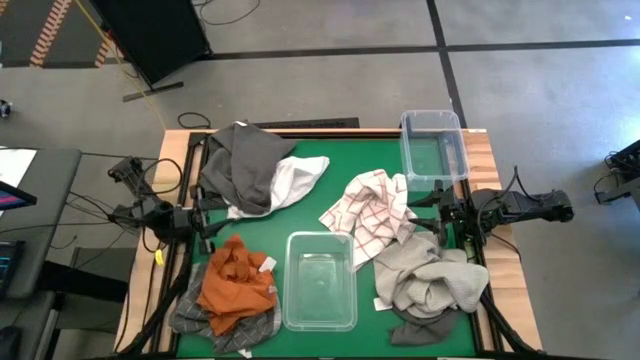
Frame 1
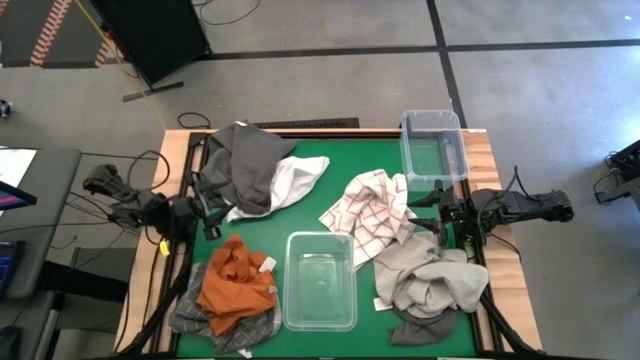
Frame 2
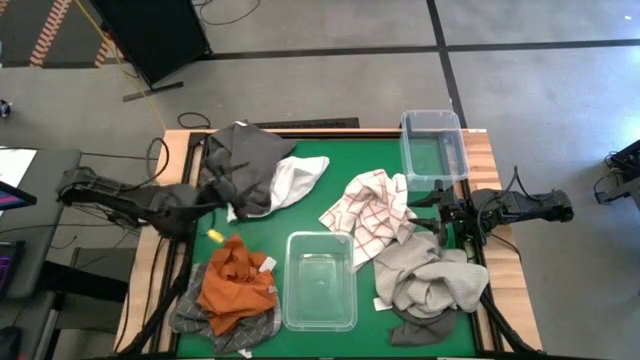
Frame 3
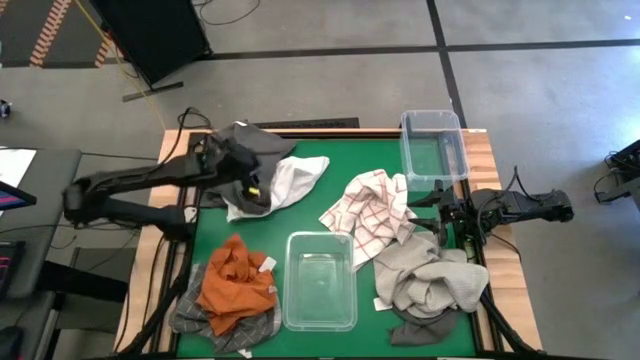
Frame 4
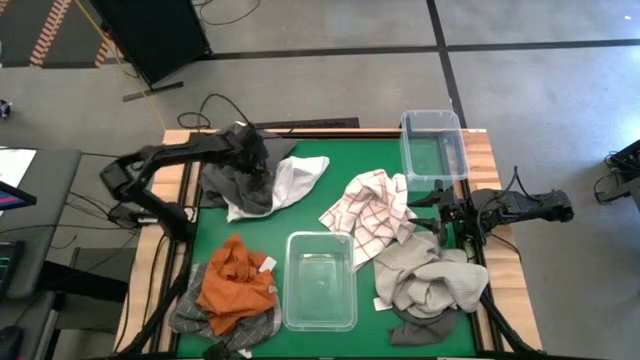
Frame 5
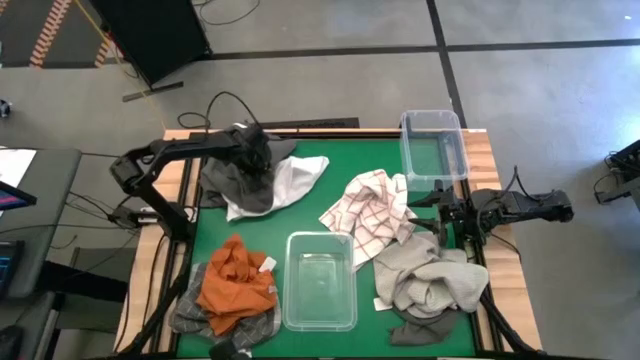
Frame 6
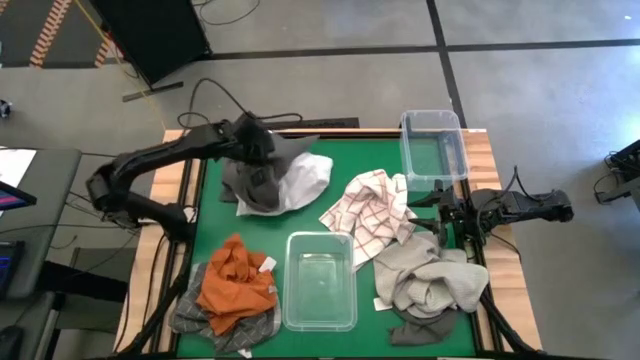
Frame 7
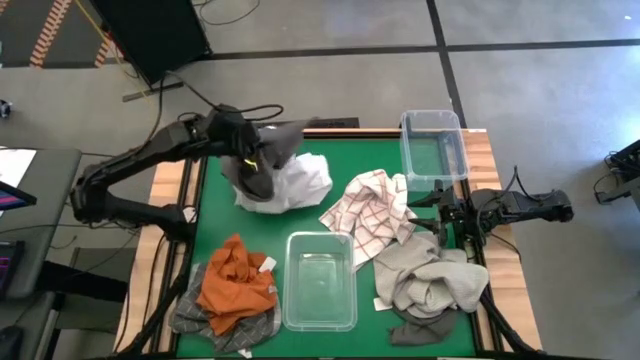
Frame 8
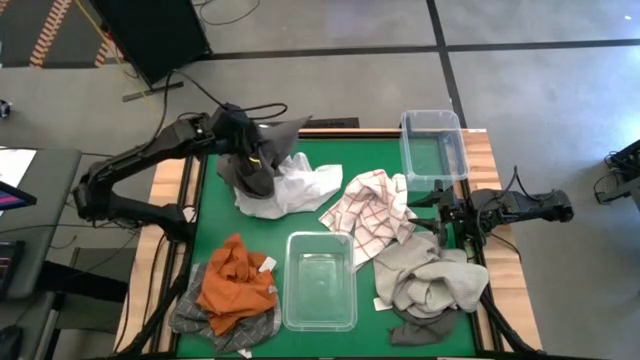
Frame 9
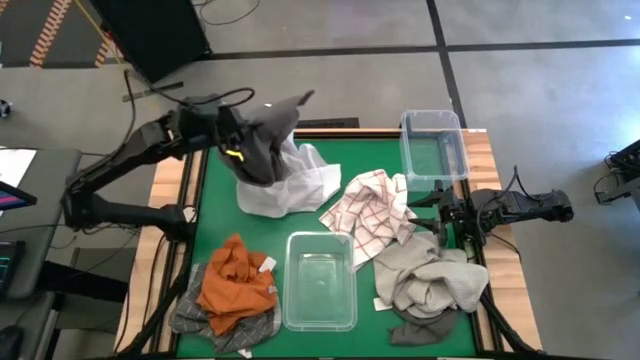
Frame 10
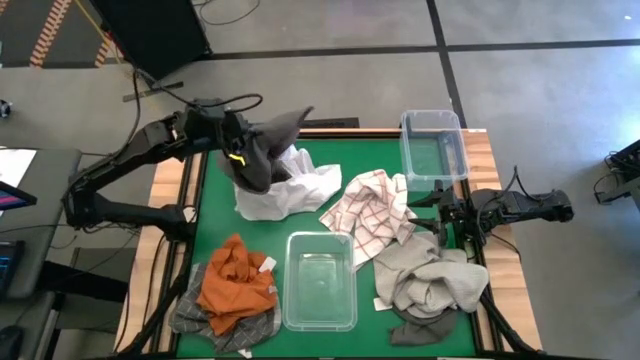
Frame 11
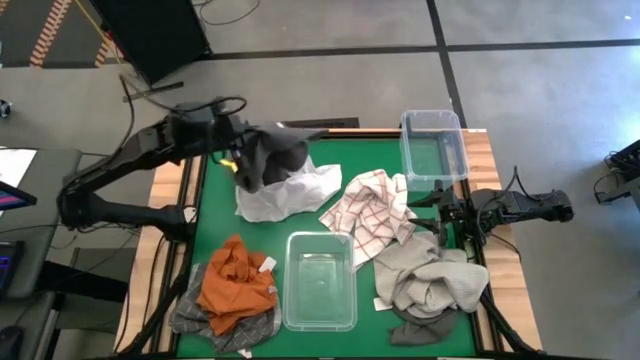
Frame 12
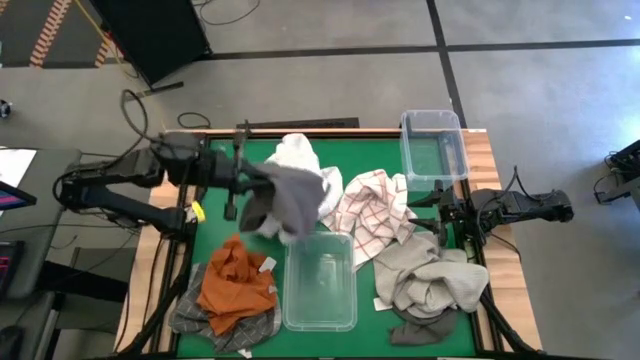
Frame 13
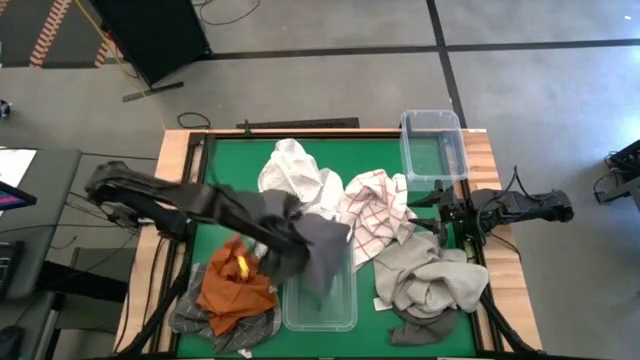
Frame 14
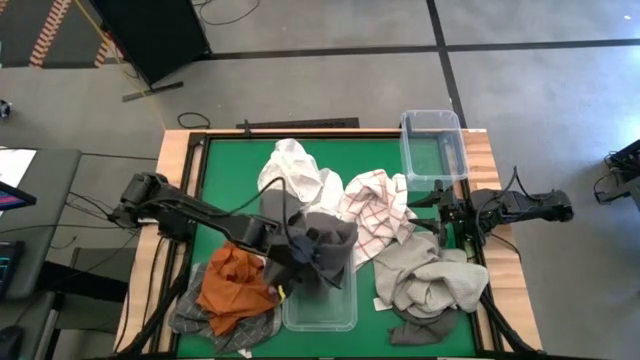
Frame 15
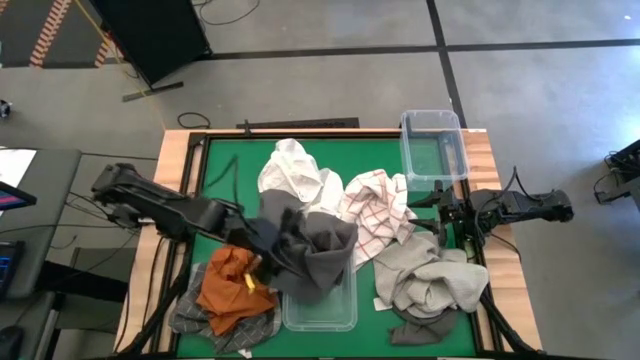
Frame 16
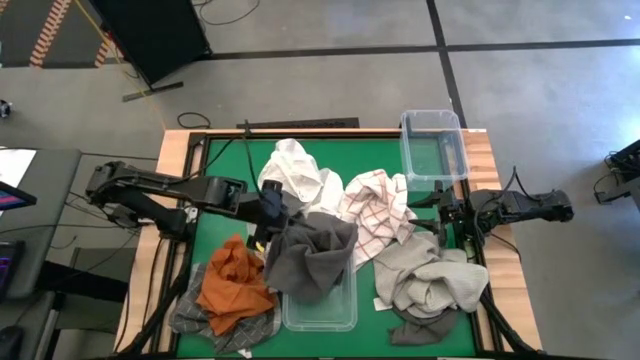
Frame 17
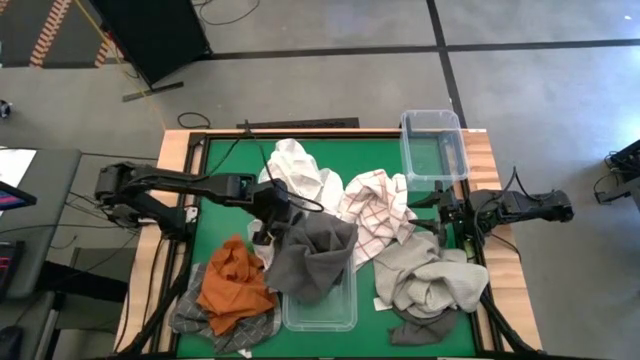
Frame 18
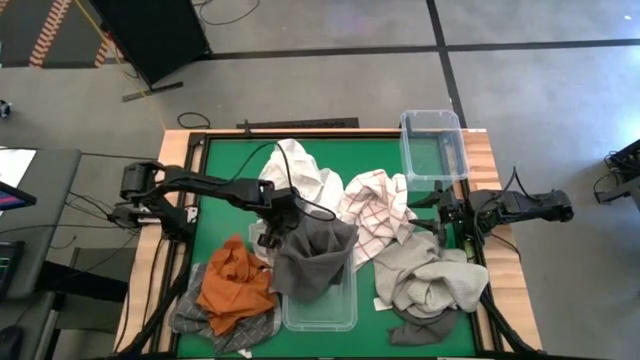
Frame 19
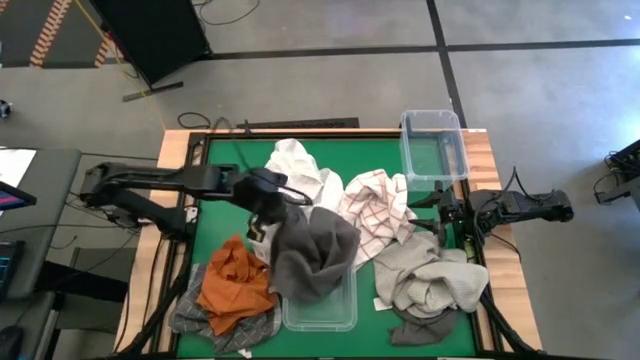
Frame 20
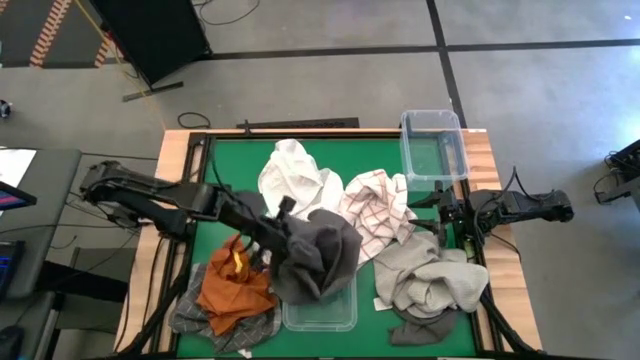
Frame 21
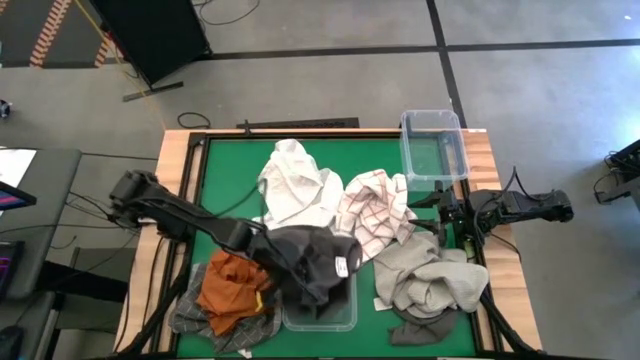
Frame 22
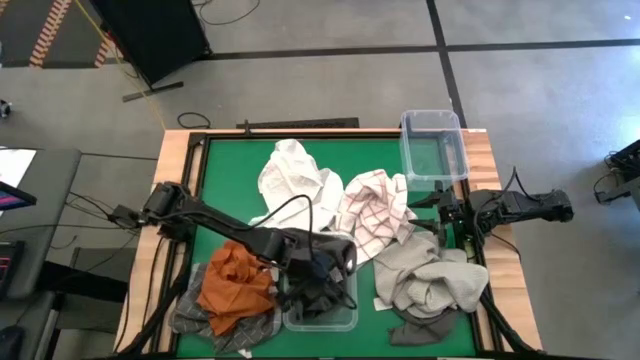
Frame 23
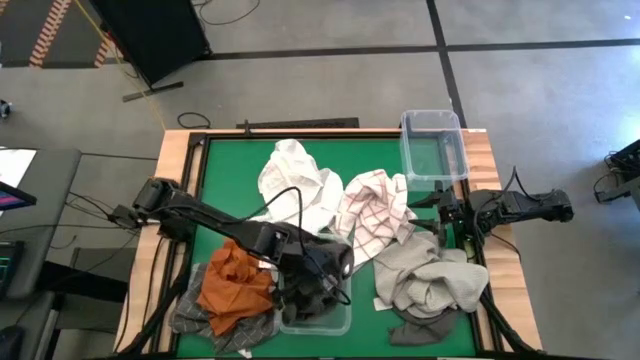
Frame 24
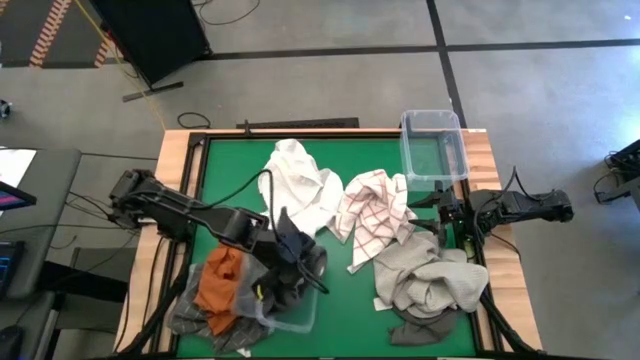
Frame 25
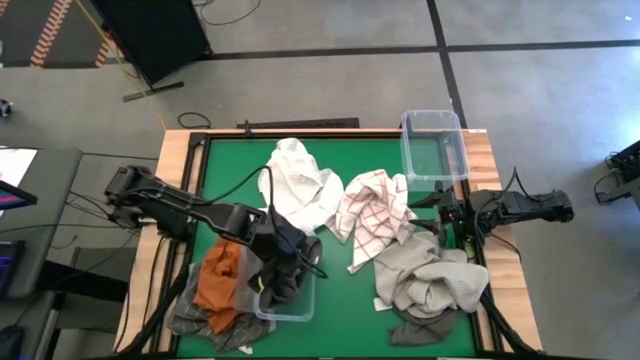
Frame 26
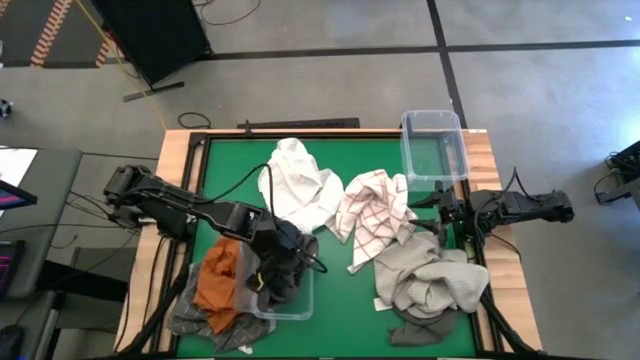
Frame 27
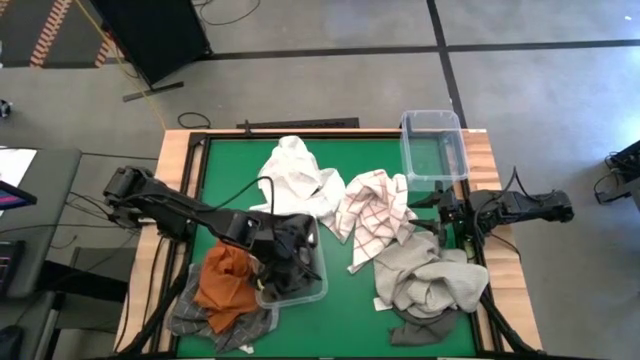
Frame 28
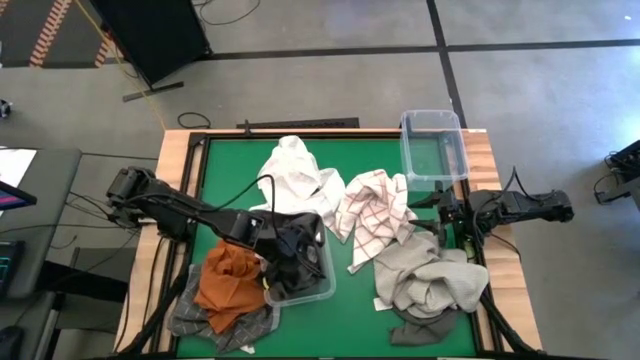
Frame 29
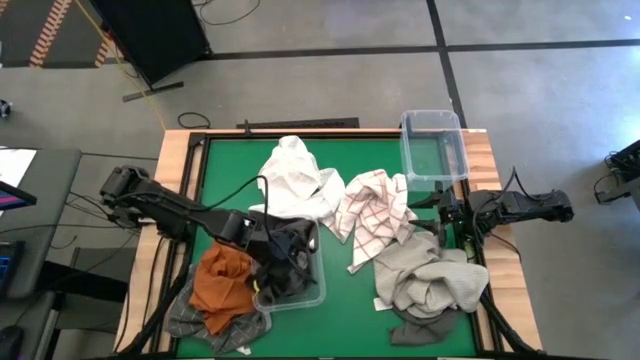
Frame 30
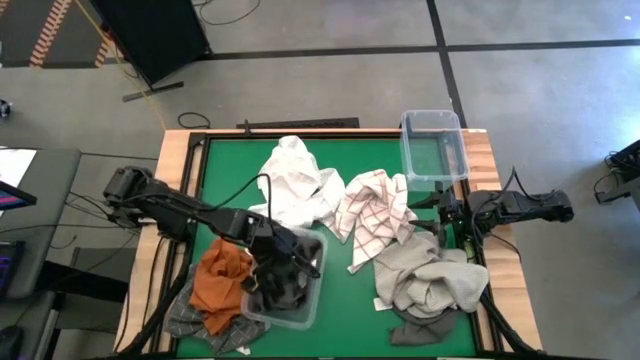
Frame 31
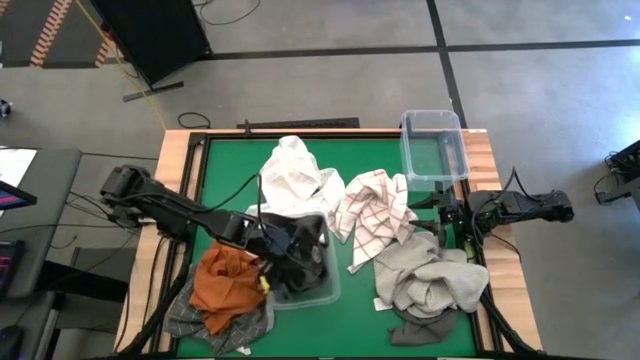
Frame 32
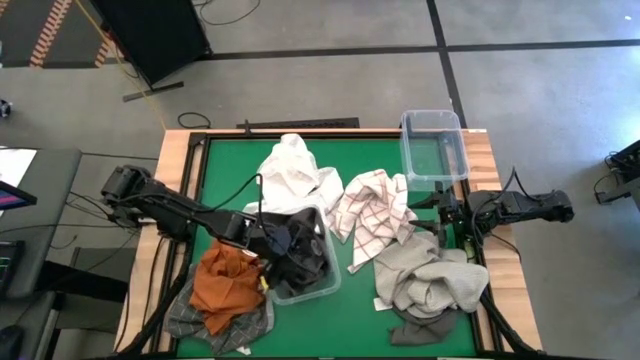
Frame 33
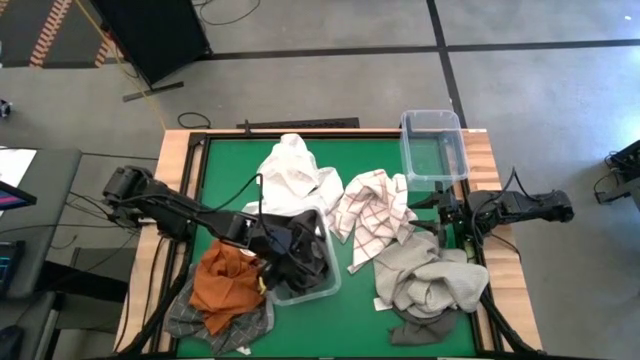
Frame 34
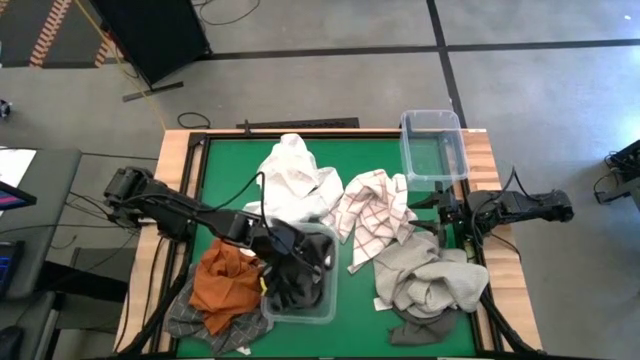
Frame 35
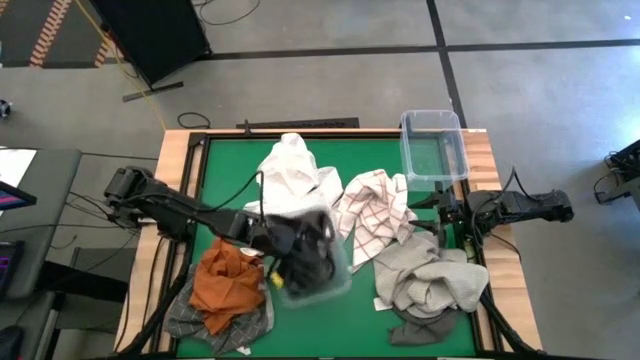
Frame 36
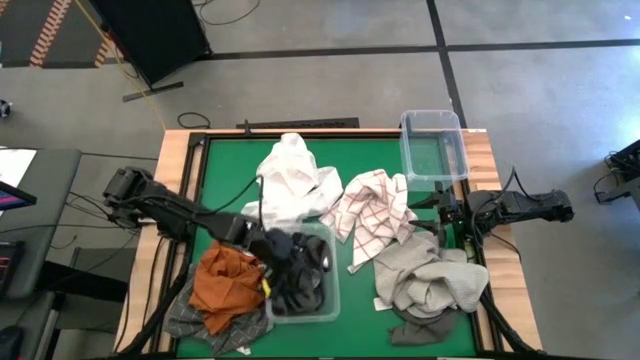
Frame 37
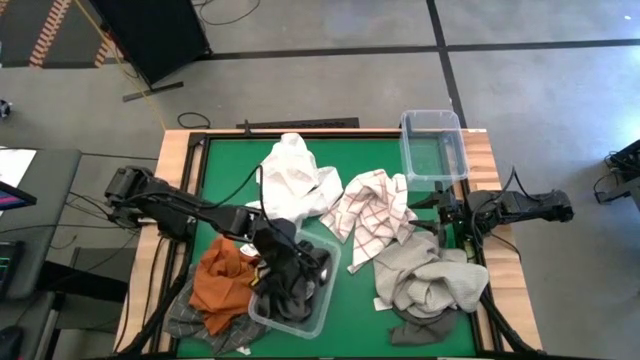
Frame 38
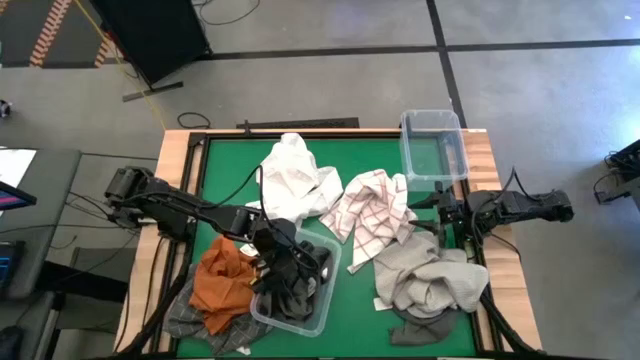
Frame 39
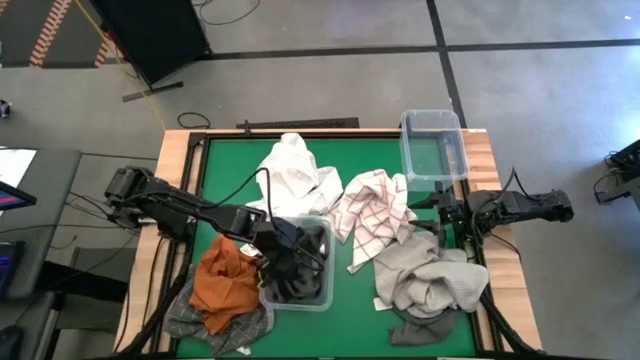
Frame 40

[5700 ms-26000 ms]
Task: Sort towels by color in basket
Put the black towel into the bottom transparent bin
